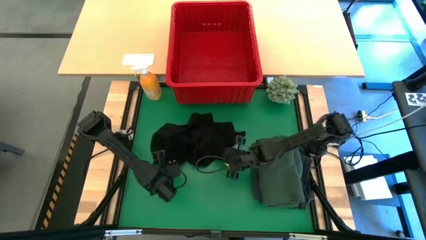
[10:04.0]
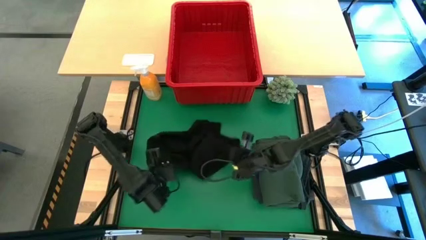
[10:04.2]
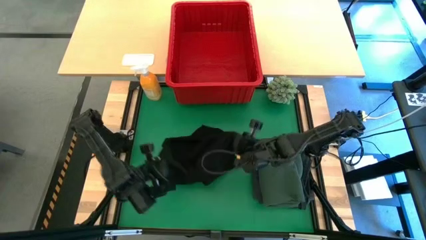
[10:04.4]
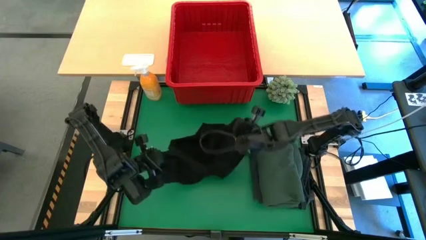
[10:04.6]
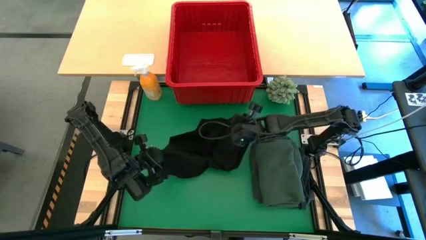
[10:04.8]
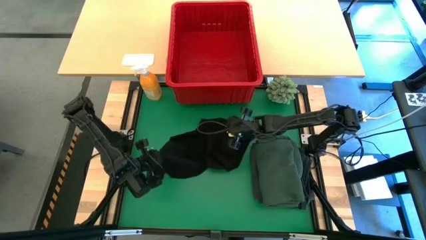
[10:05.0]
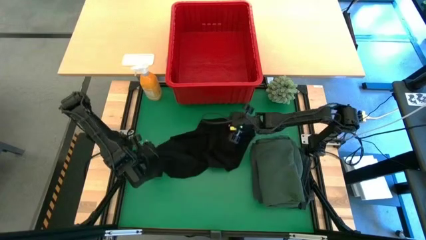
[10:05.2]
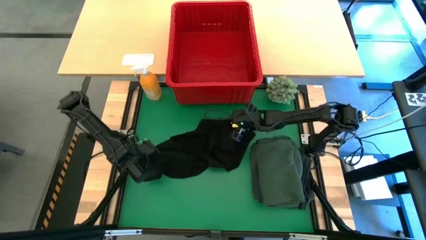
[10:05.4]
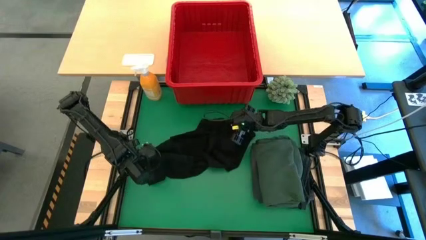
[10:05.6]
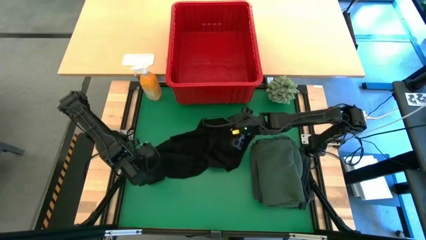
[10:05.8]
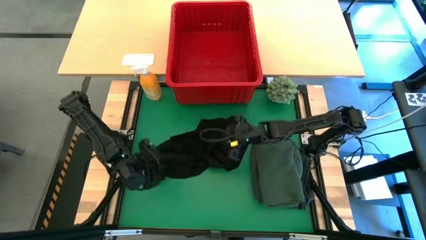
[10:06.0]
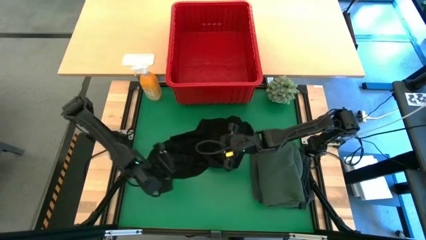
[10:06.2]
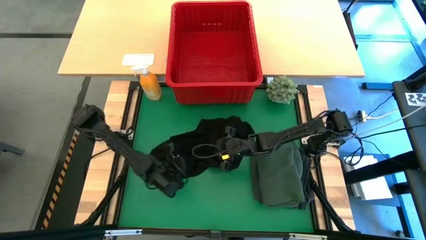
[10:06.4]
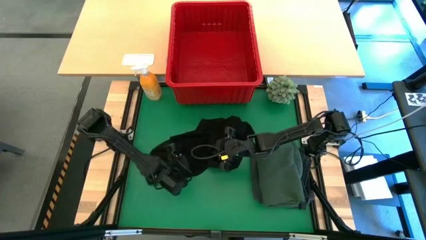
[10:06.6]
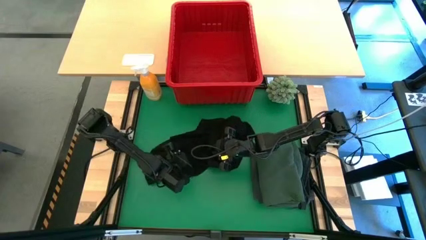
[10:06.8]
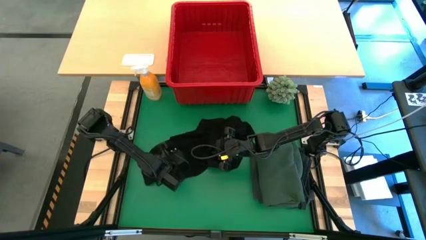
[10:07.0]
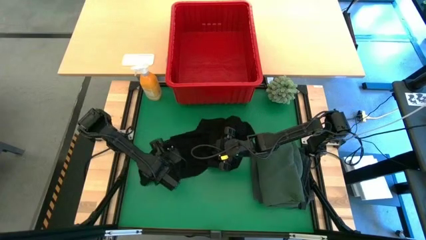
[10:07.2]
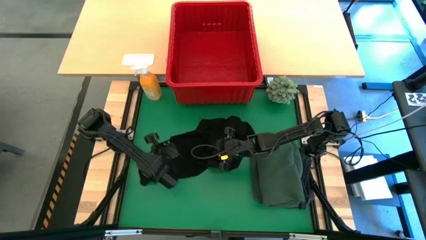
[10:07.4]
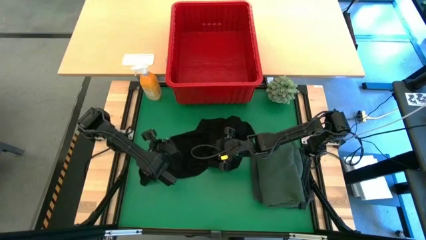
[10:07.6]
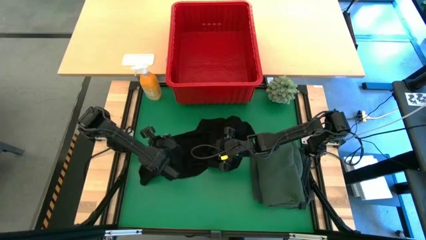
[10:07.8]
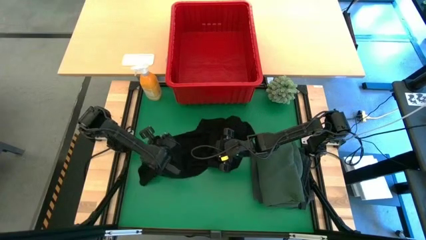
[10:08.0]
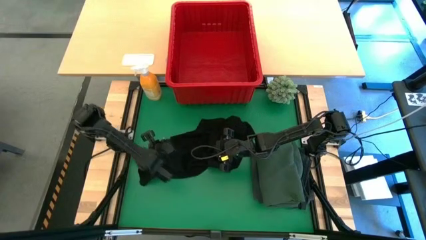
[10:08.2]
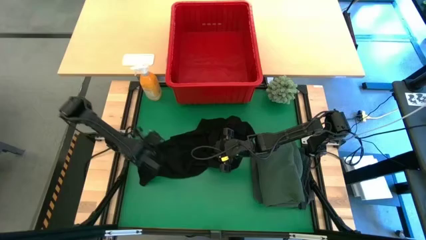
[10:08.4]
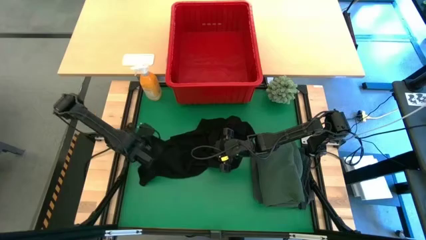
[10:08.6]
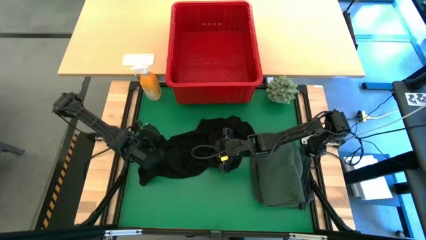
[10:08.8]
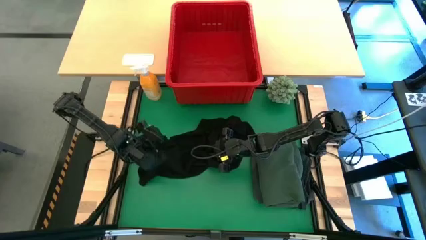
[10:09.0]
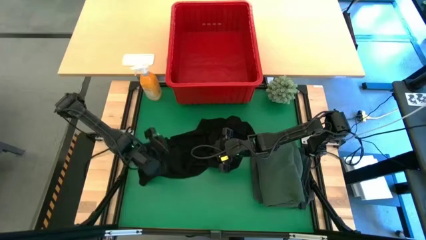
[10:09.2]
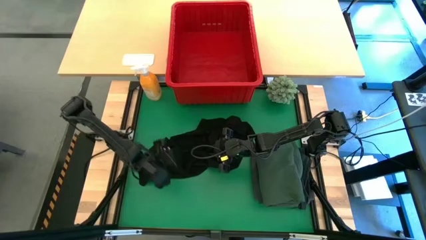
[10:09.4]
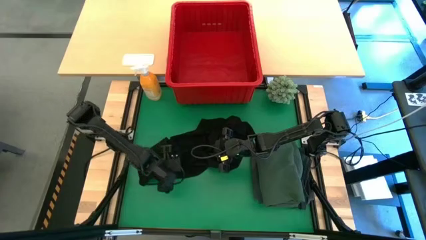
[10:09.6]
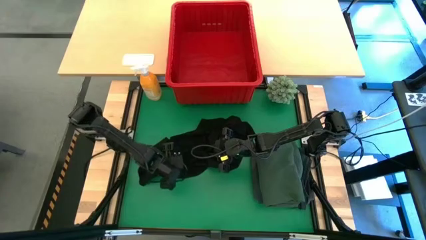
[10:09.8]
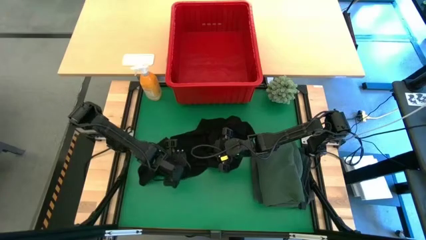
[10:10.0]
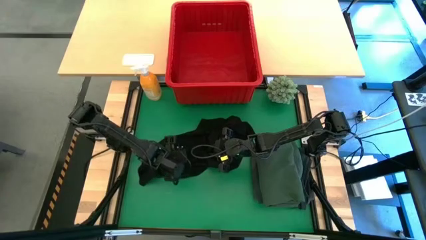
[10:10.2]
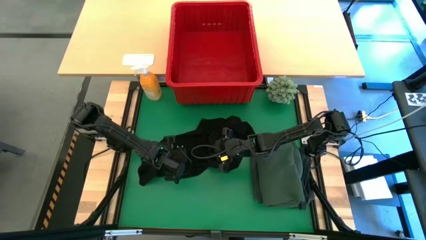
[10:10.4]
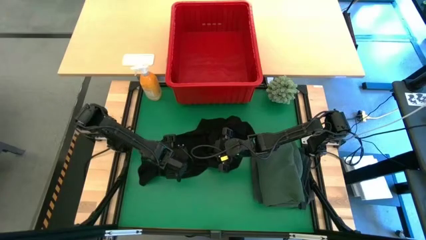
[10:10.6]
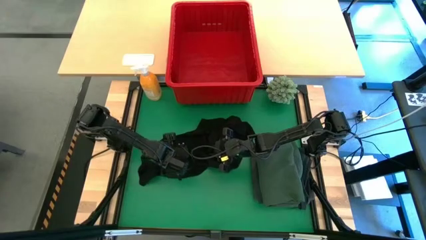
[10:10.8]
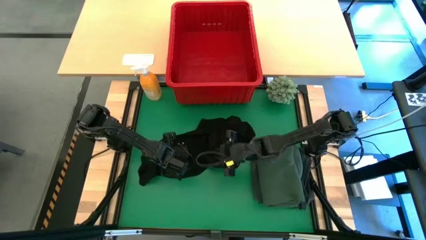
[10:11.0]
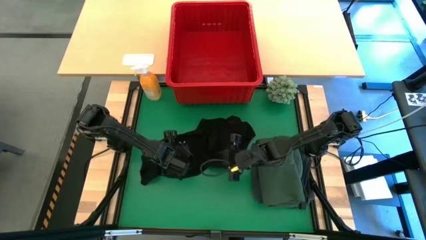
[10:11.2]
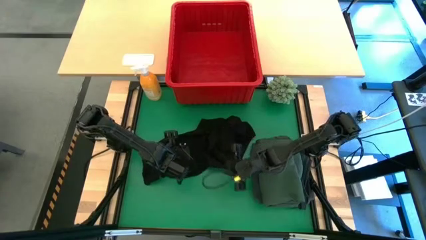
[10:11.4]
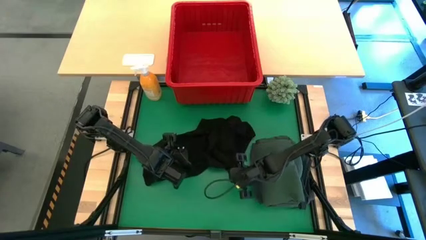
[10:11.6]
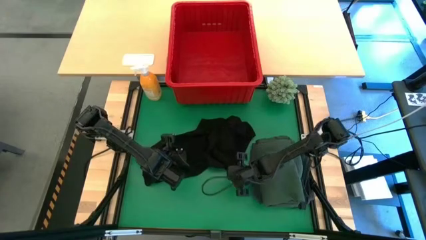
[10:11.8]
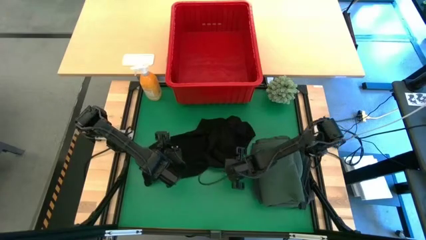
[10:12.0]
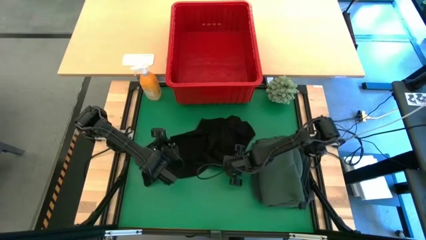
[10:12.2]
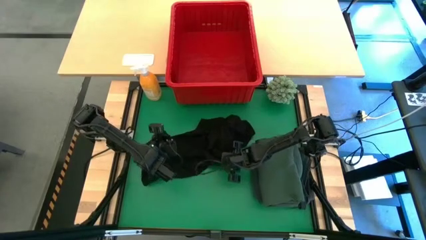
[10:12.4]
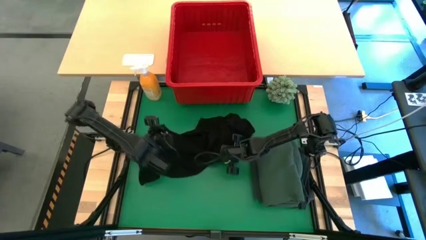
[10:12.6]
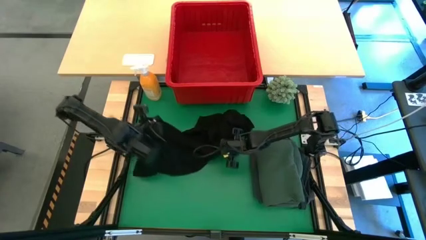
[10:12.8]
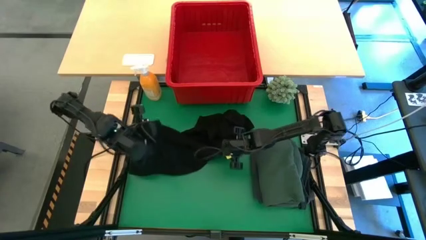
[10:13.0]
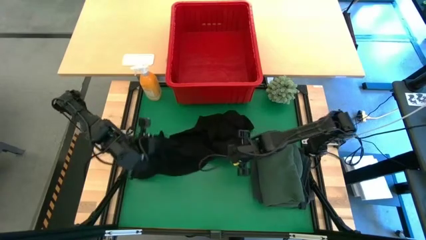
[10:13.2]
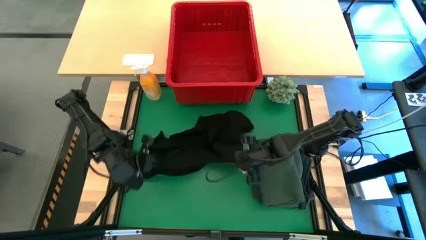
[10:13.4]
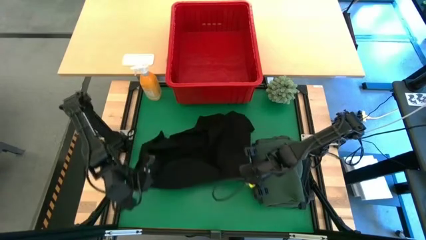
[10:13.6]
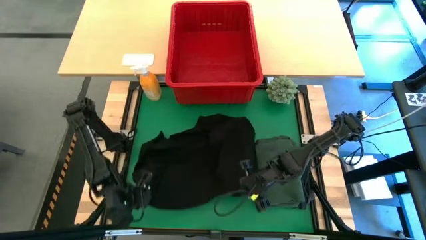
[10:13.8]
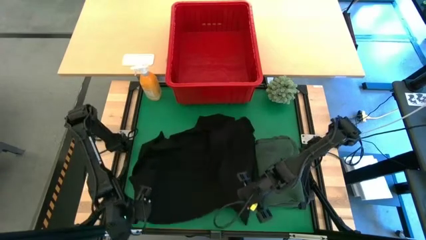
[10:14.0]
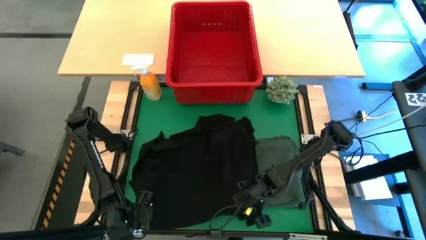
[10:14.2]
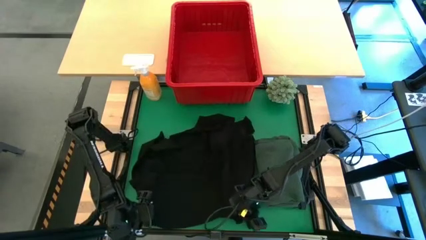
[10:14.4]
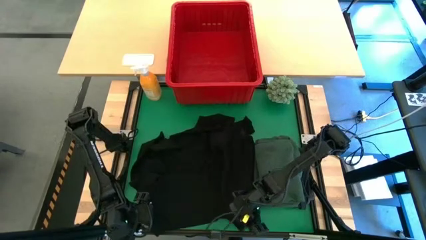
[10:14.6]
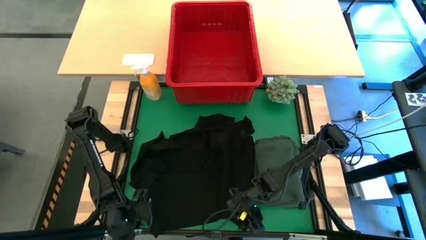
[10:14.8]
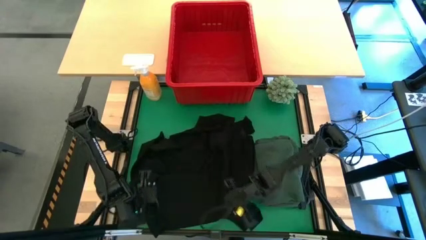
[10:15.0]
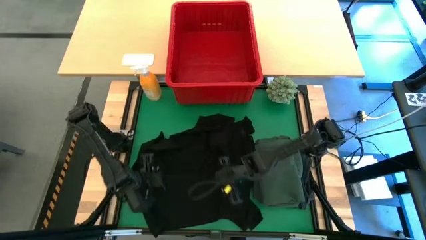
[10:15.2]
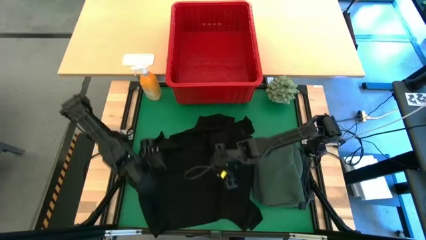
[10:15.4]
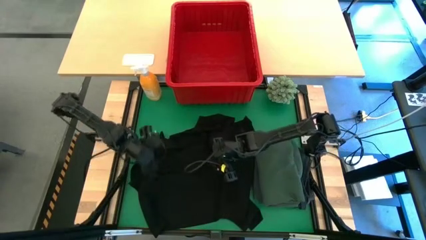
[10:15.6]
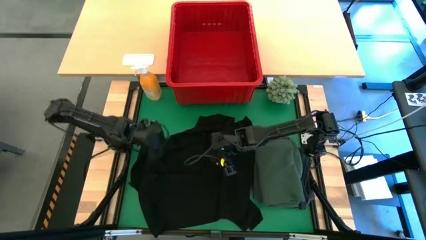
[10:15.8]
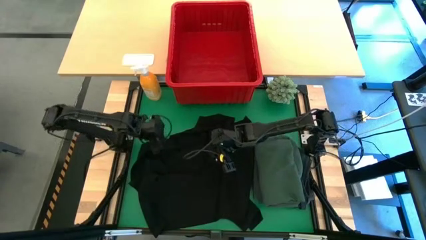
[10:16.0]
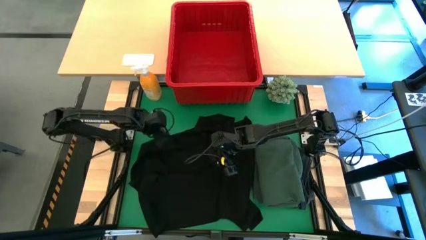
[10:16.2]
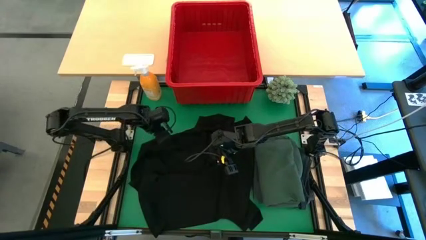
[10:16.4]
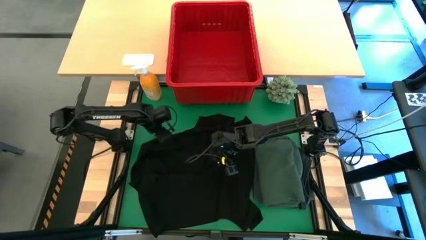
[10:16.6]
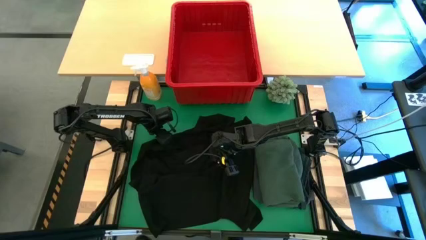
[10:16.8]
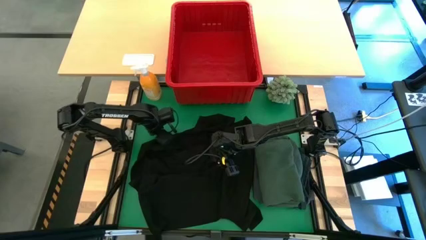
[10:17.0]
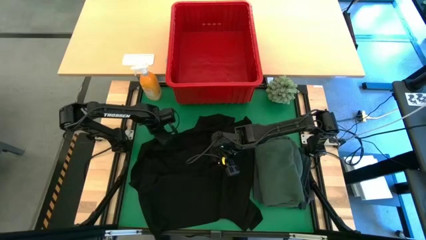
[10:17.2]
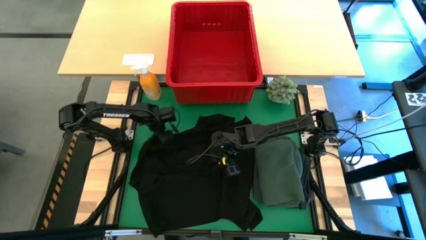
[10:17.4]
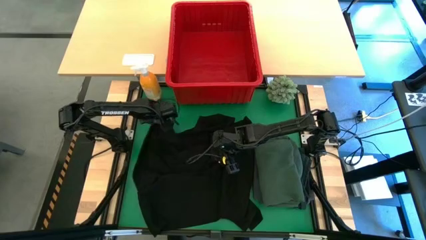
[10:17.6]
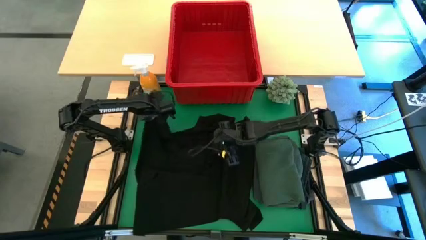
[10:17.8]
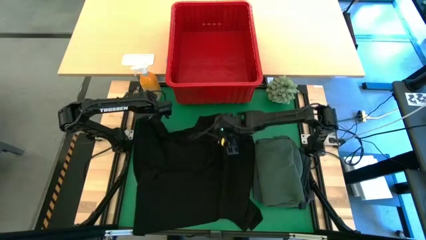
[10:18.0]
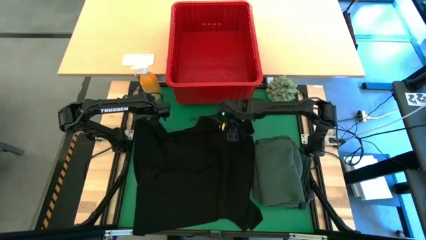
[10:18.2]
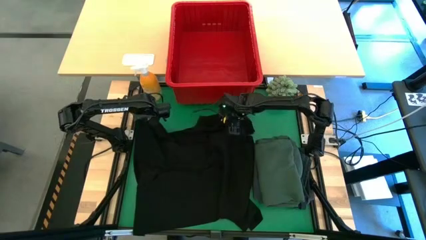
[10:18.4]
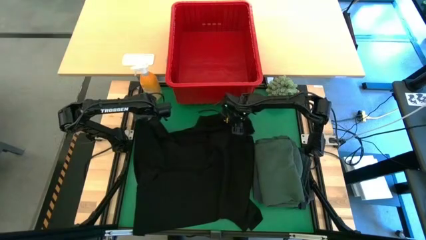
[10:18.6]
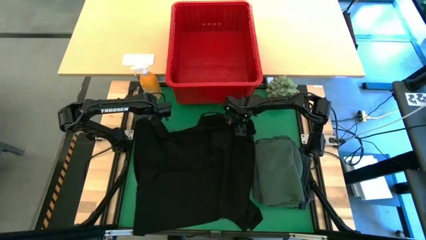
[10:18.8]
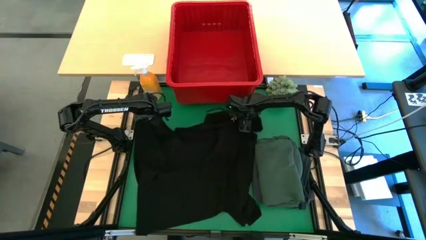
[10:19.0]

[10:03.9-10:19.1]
Task: Fold Laundry from Bin
Fold the black shirt

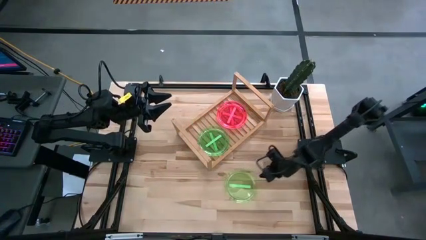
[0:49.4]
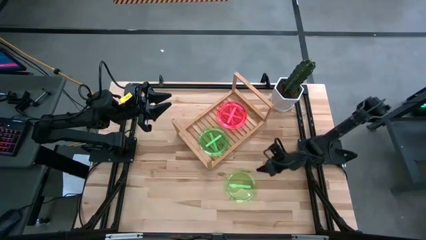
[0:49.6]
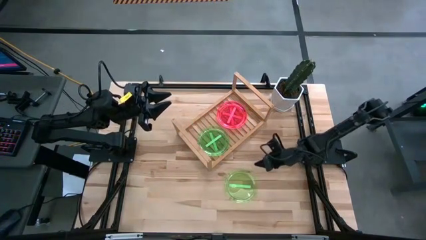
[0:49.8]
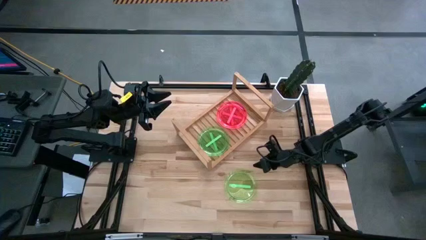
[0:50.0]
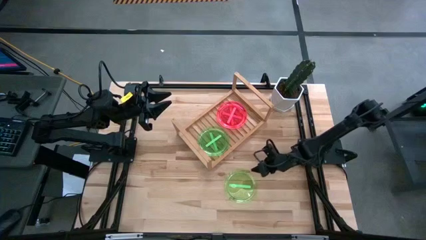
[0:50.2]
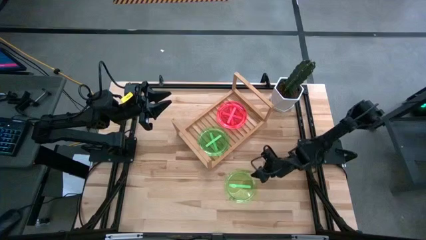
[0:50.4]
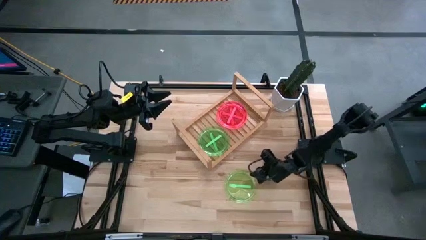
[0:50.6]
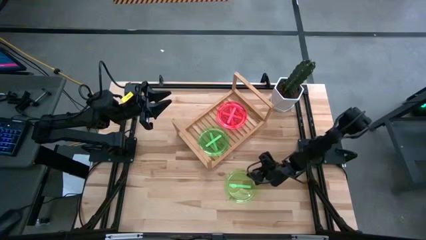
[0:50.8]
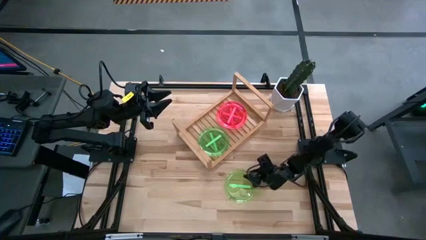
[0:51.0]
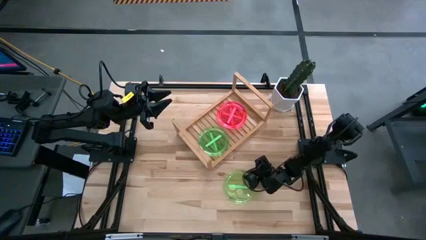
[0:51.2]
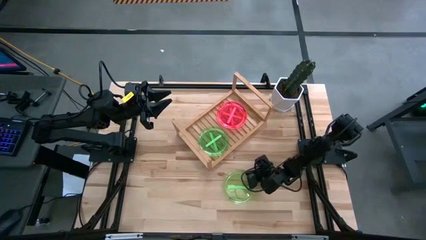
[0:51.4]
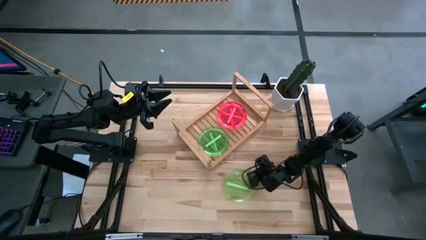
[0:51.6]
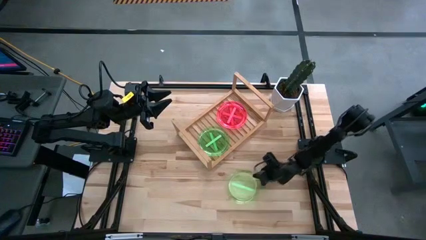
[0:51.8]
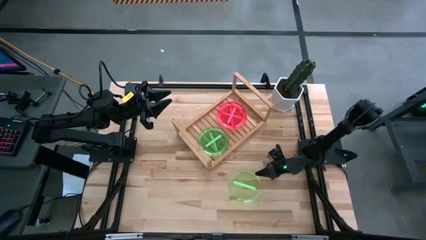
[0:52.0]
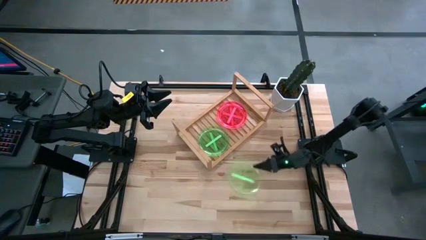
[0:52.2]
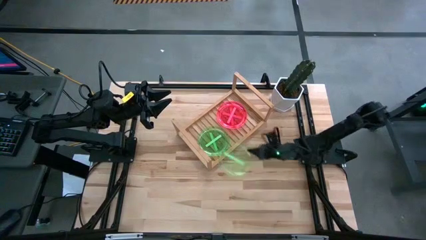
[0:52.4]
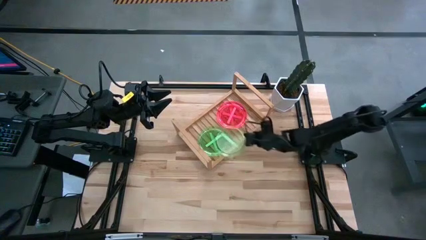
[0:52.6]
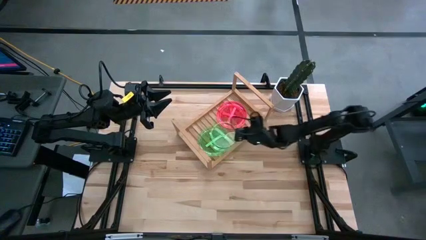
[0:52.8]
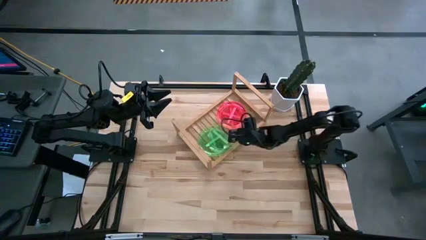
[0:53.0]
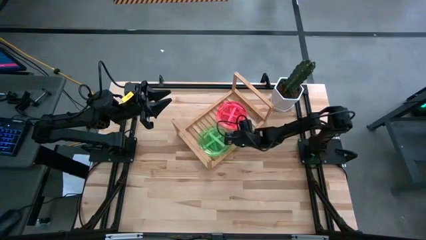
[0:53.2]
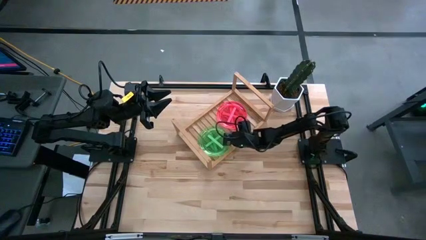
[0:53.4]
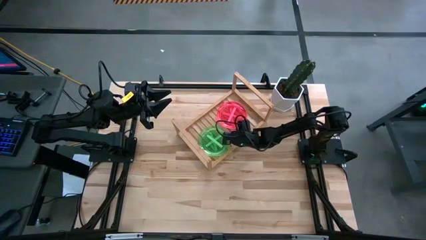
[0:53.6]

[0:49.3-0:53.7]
Task: Place and stack plates onto a shelf
Stack the green plate on top of the other green plates on the shelf
